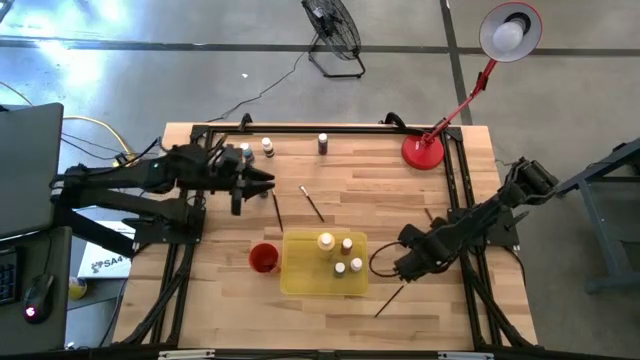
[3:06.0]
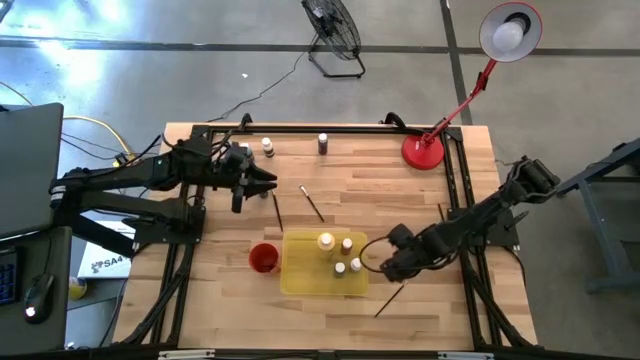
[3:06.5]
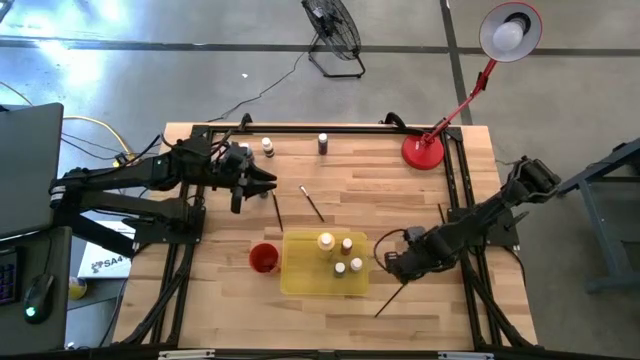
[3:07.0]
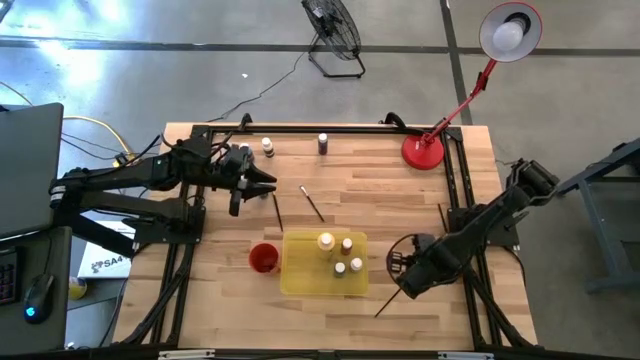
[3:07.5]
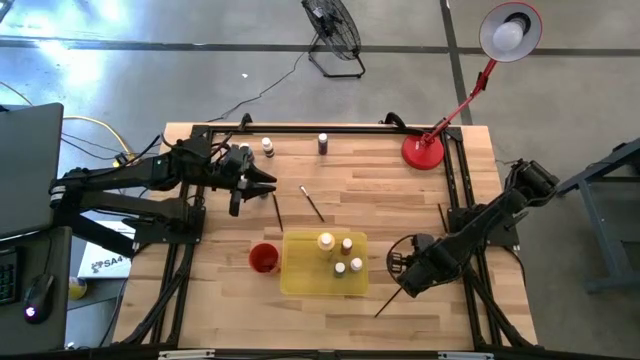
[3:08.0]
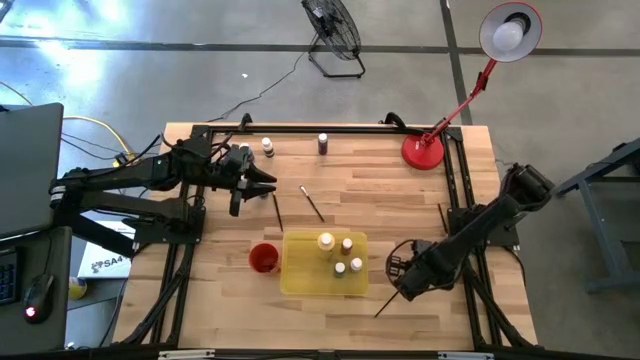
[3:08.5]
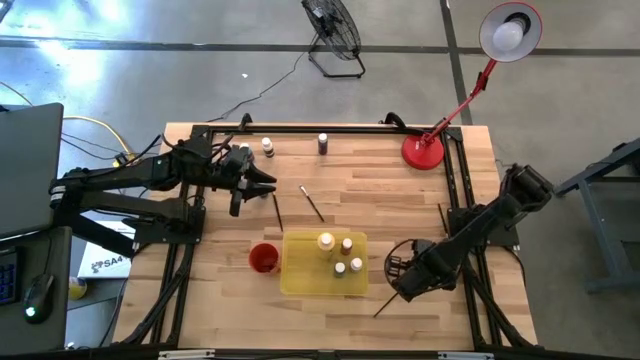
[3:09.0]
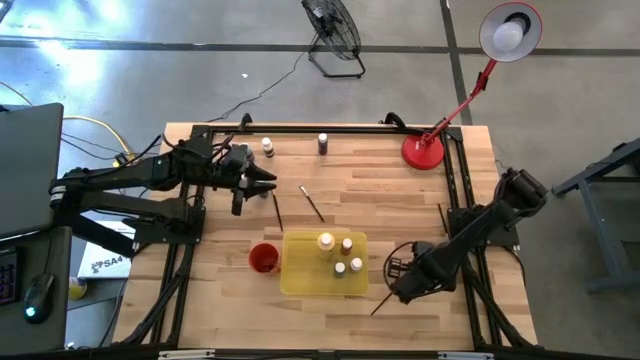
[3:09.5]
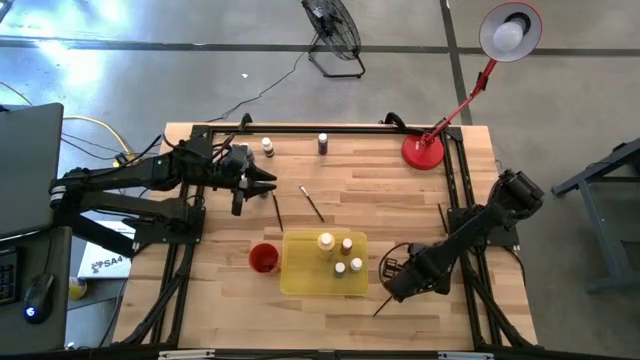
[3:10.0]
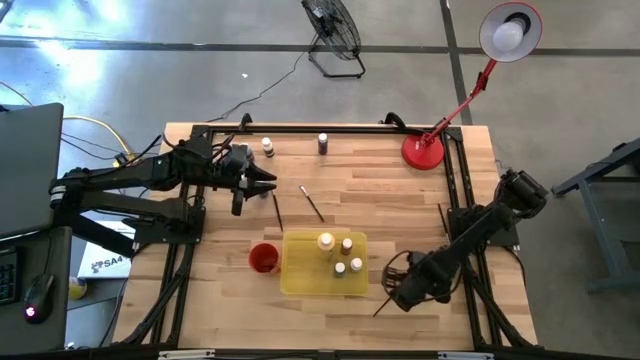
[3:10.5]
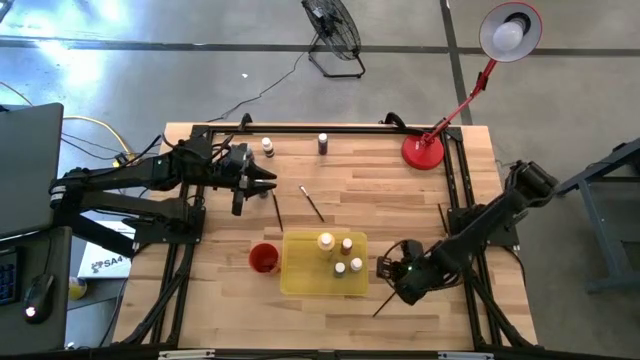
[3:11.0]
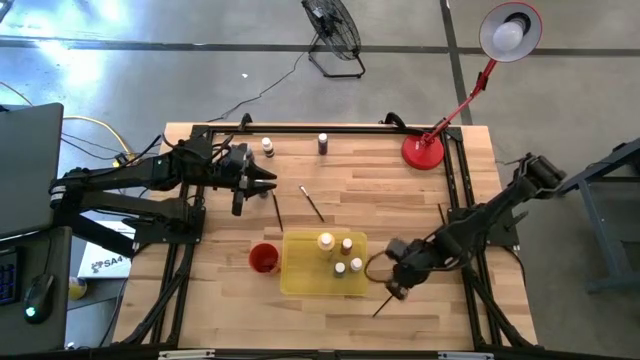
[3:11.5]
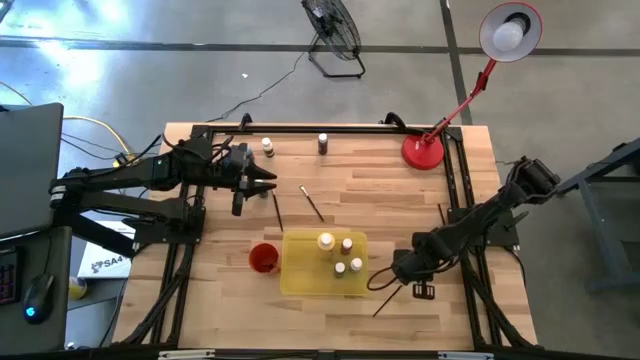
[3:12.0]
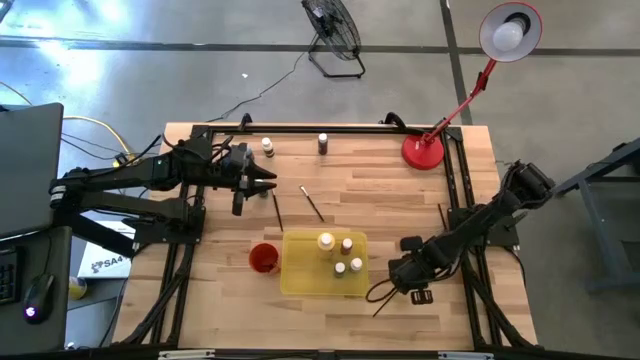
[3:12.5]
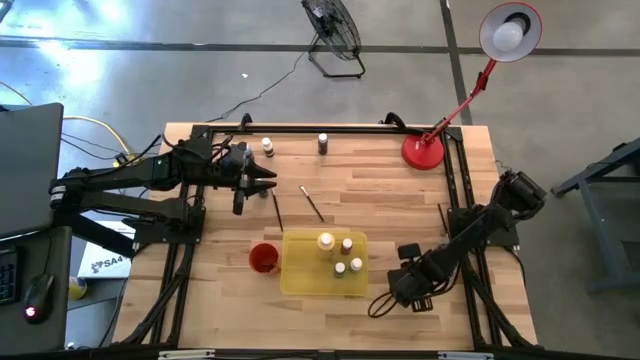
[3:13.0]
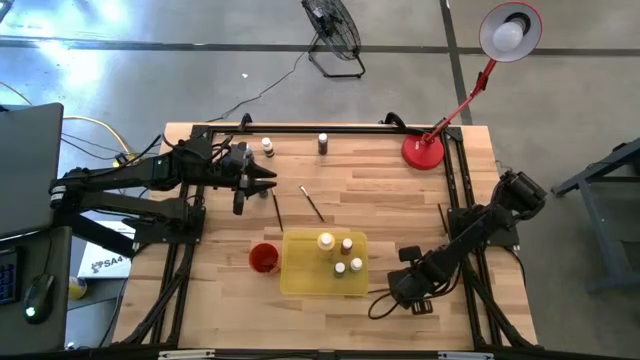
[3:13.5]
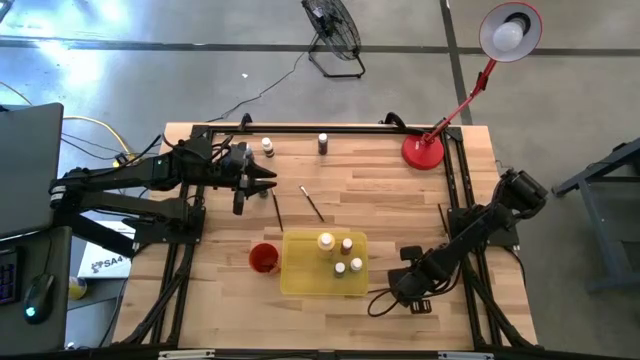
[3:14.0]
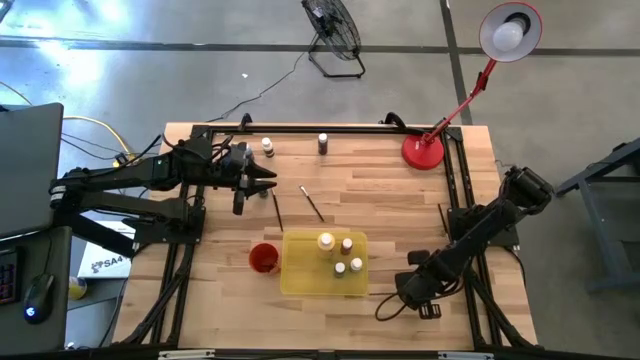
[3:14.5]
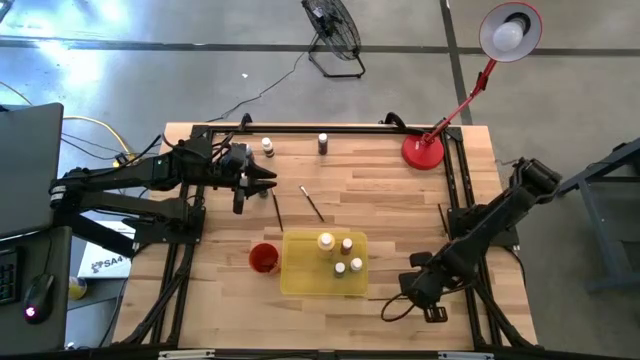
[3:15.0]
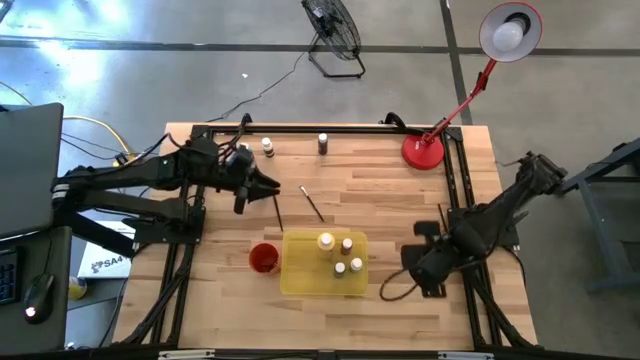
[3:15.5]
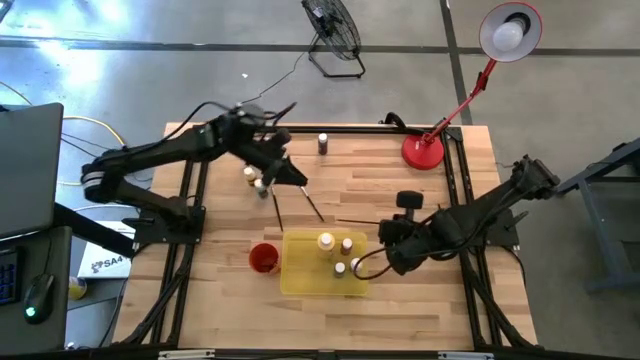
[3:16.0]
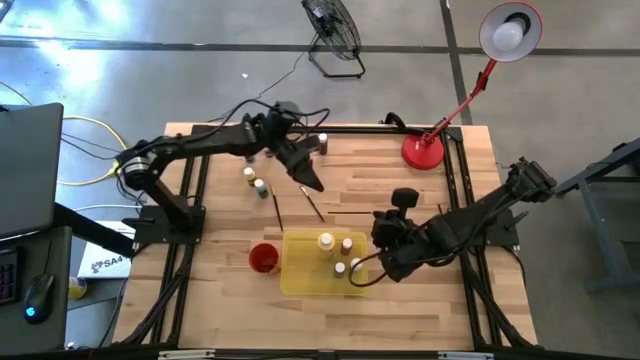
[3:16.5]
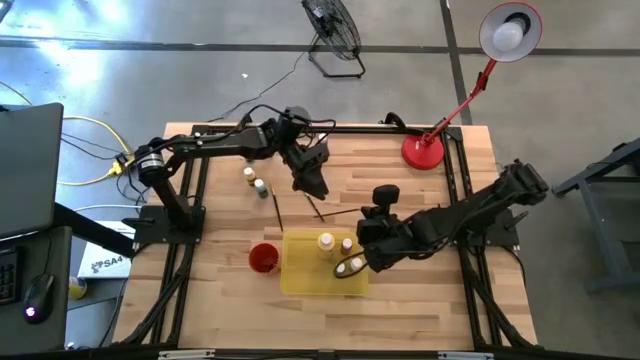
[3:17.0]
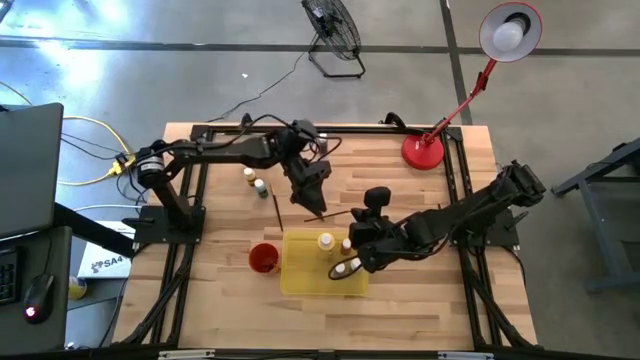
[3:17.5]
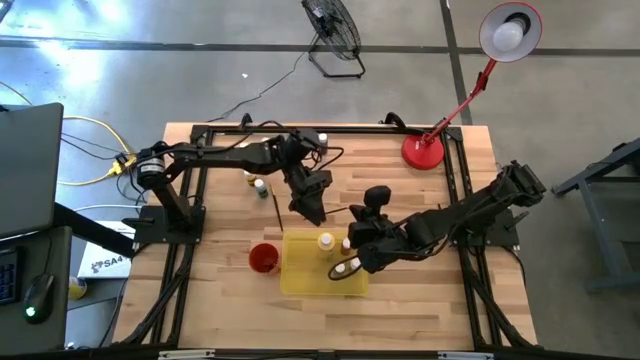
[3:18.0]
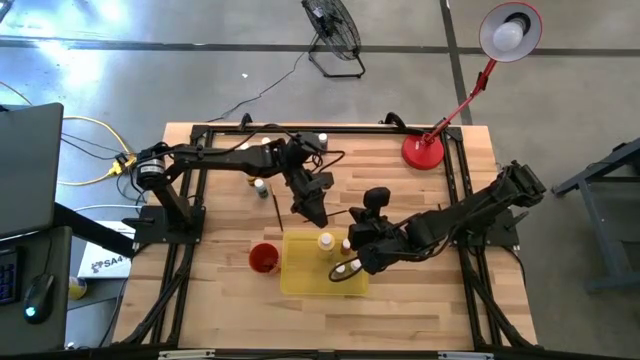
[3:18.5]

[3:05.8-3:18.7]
Task: Pick & Place Paint Supplies
Put the golden paintbrush into the orange cup

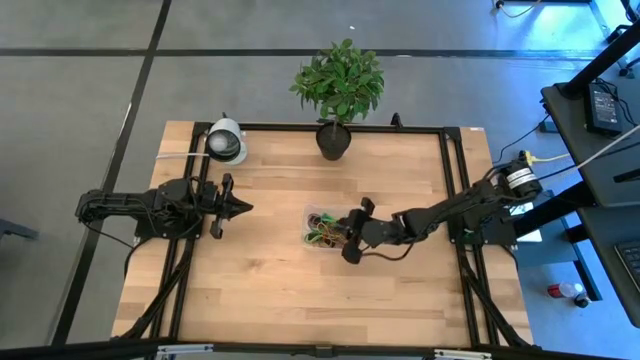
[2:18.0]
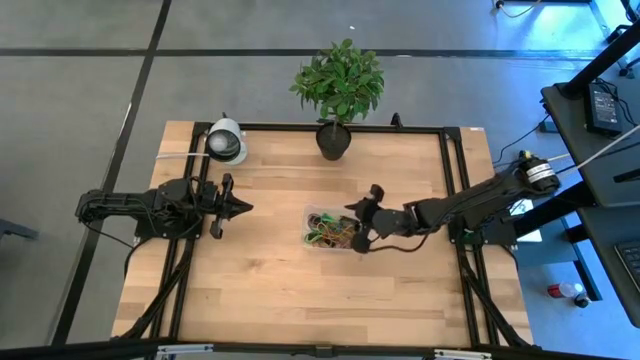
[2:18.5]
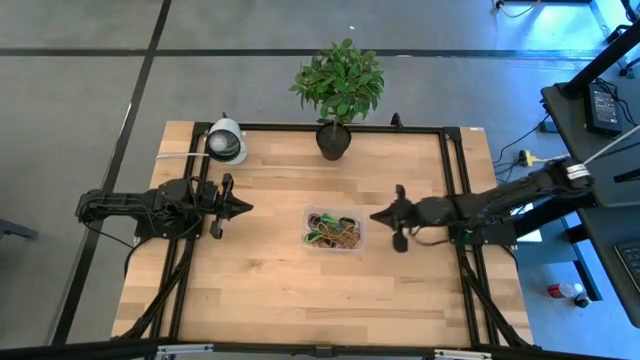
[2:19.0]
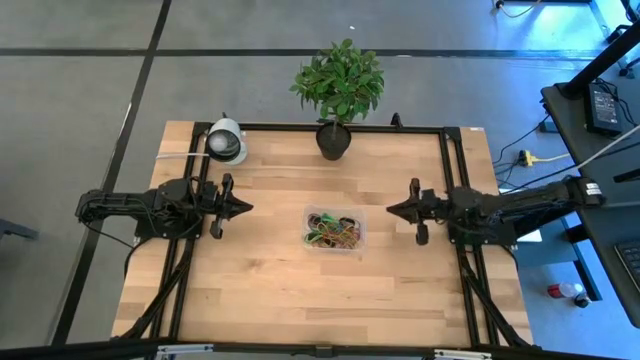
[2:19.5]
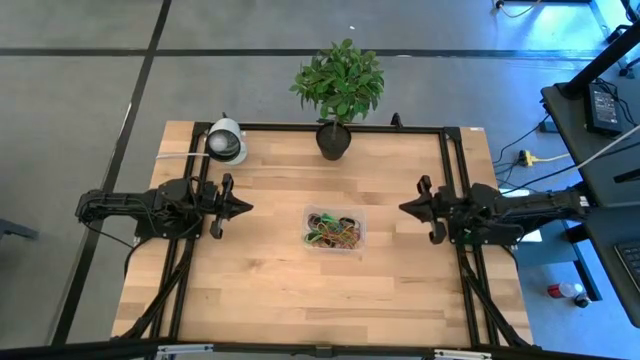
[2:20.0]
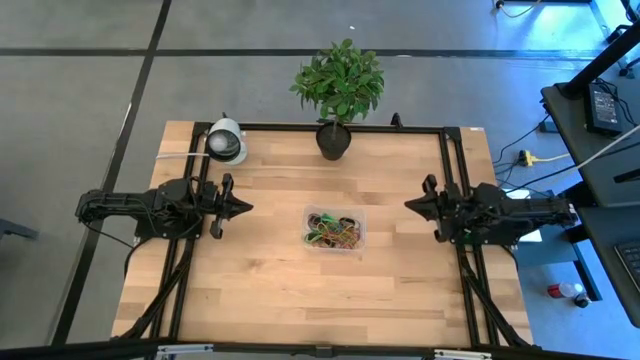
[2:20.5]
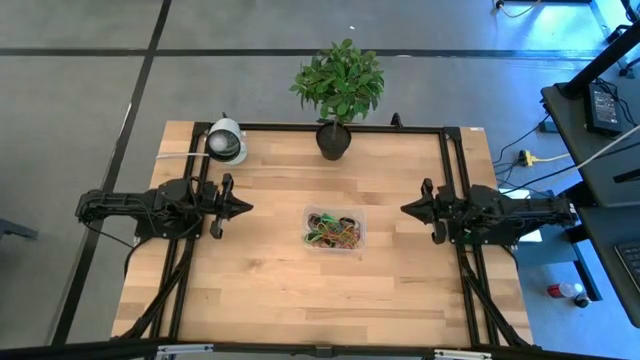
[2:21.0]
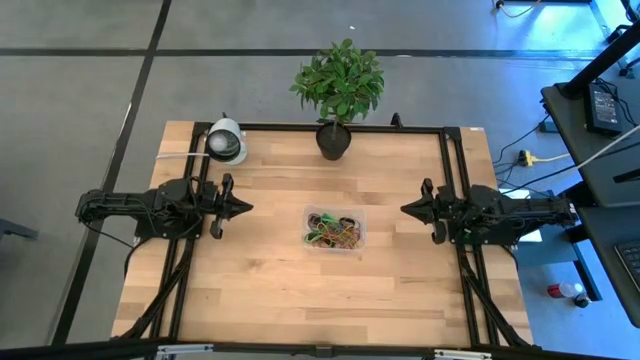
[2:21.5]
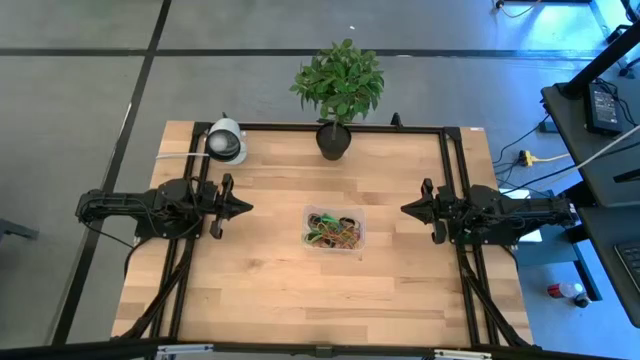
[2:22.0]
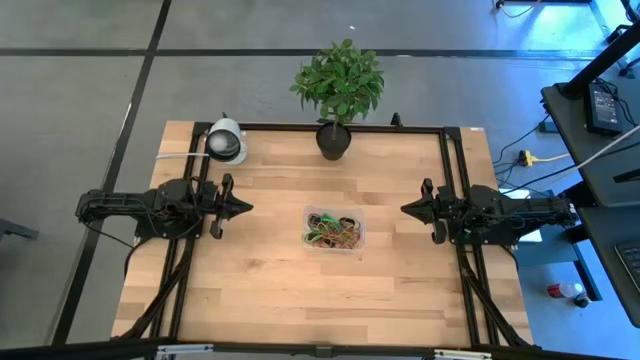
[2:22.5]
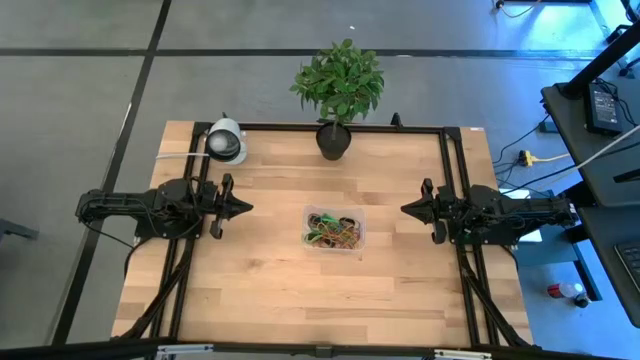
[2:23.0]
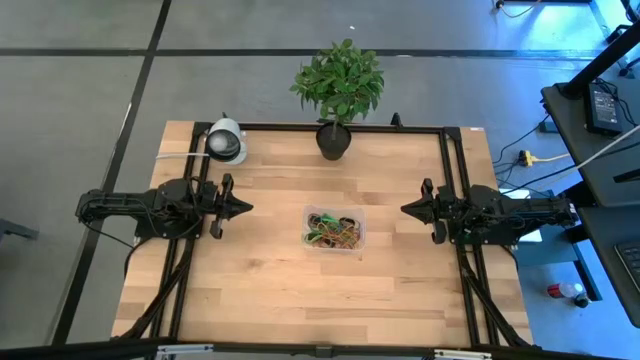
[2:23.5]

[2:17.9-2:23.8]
Task: Pick and place rubber bands into bin
Return to Home Position
